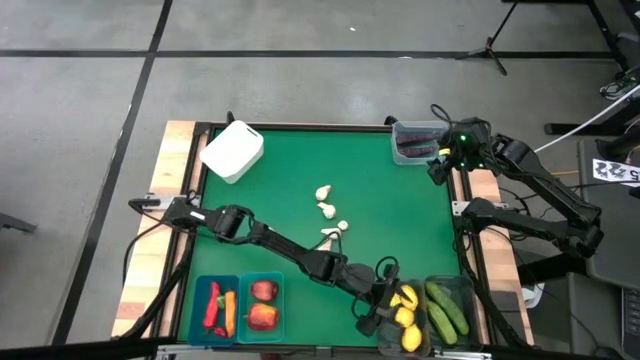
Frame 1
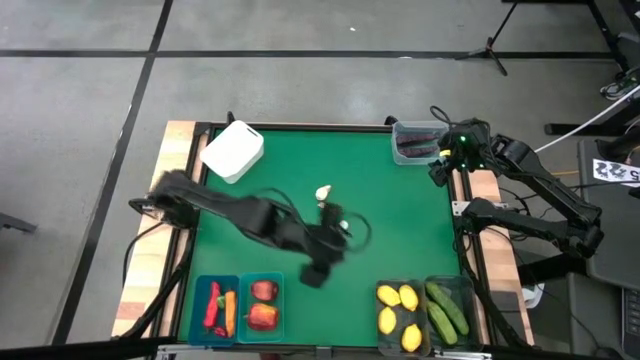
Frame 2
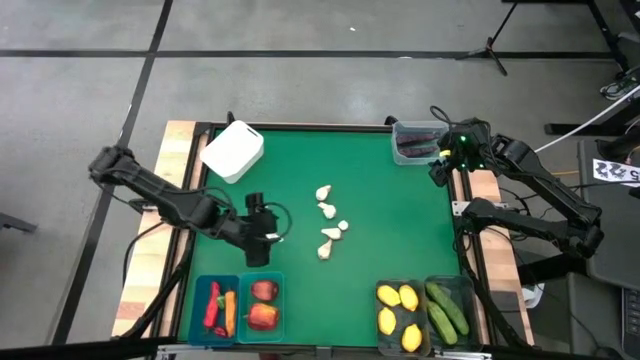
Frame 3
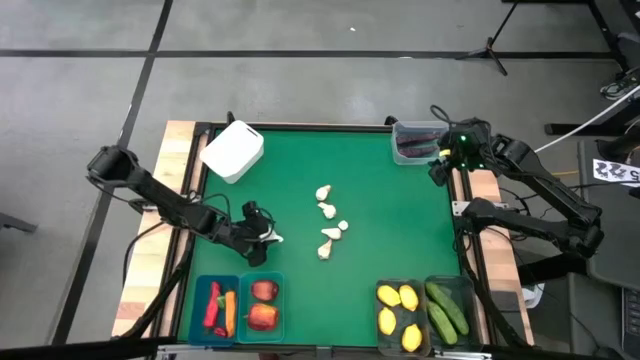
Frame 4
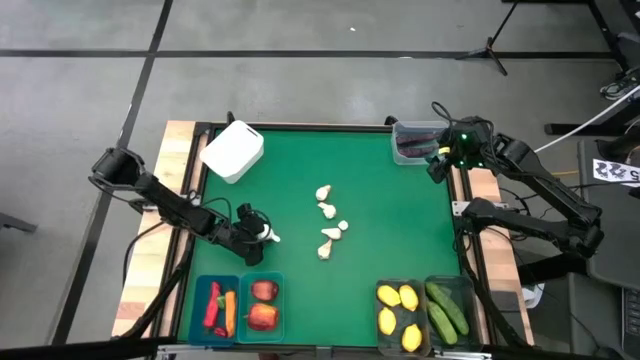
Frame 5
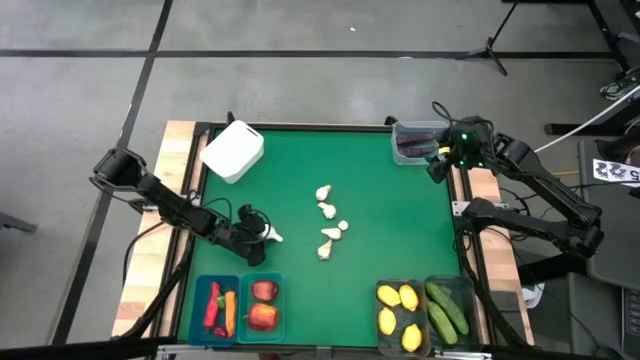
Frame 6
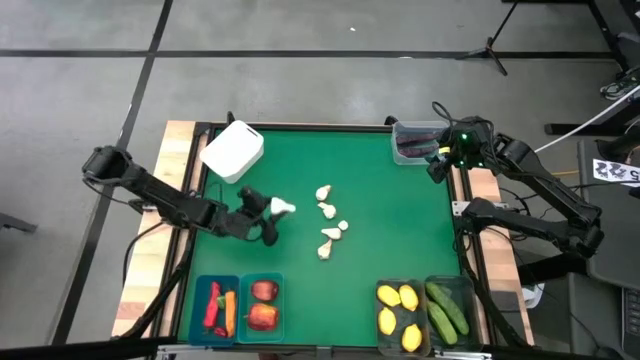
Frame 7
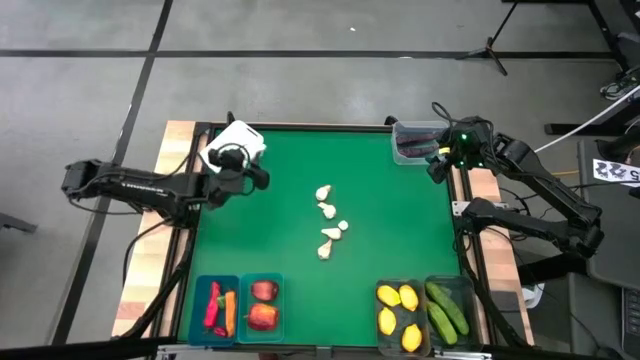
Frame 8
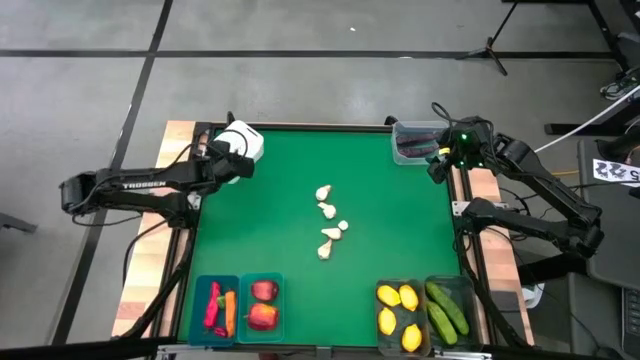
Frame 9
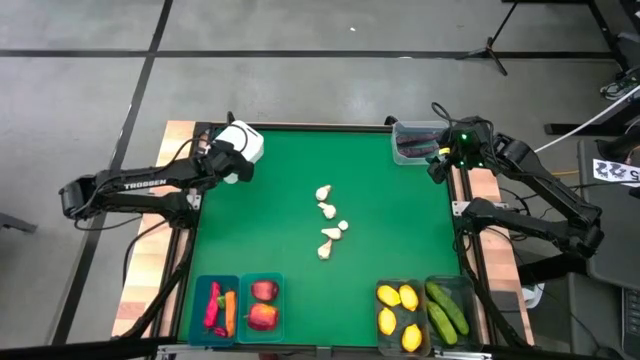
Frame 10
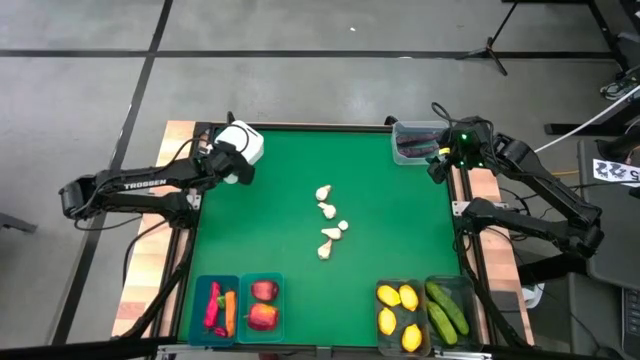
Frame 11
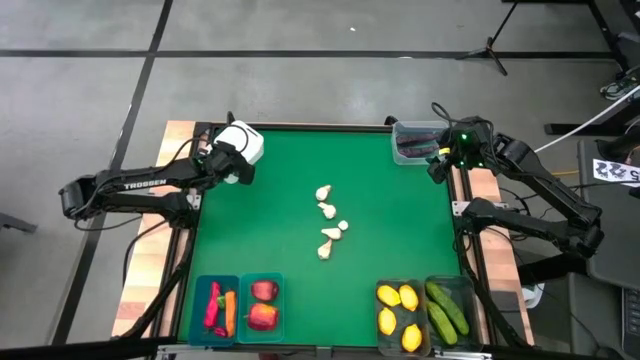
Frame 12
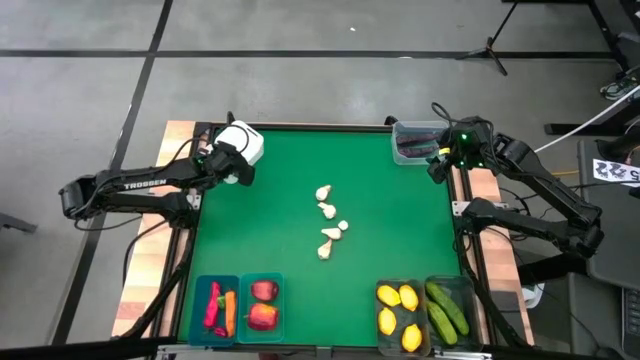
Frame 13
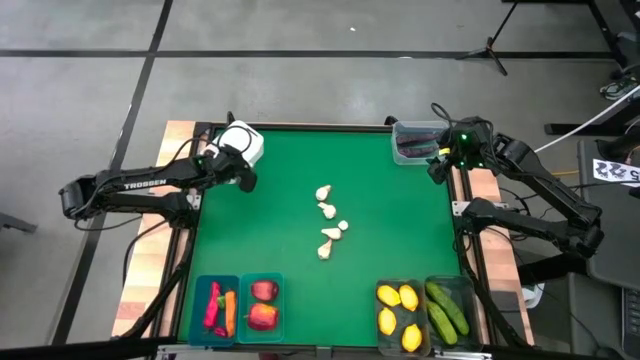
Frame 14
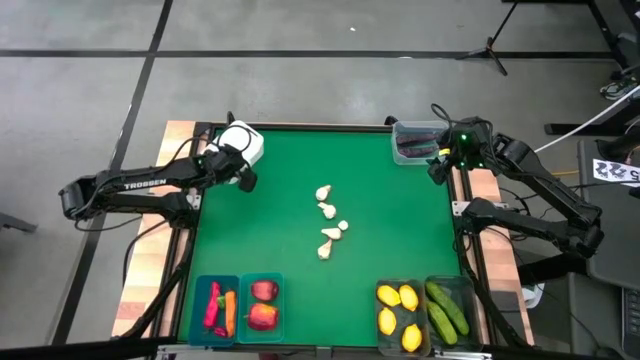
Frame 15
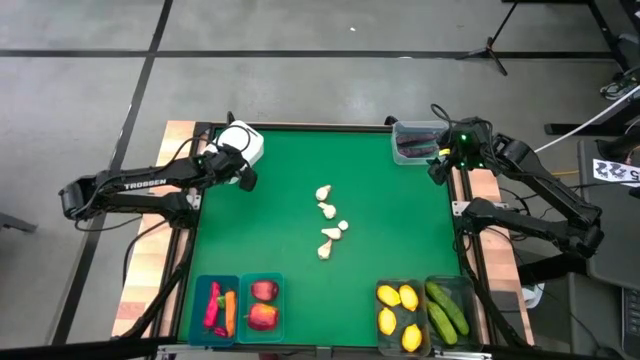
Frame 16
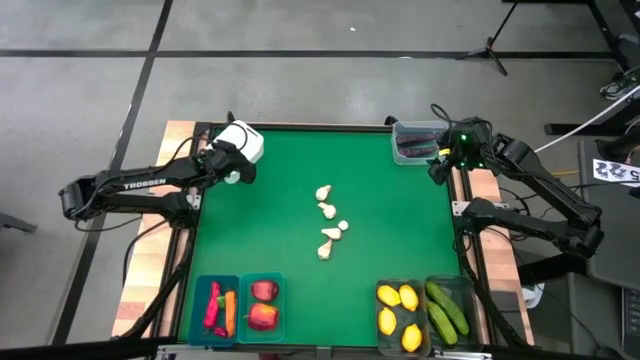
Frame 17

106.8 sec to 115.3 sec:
Task: Sort produce into baskets
Put the garlic into the white bin

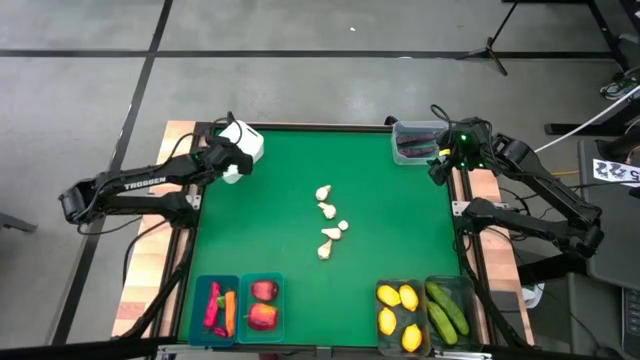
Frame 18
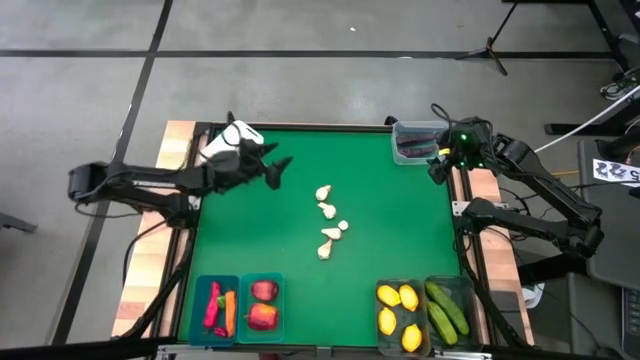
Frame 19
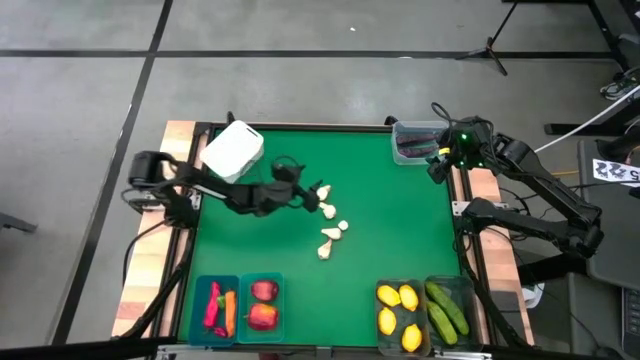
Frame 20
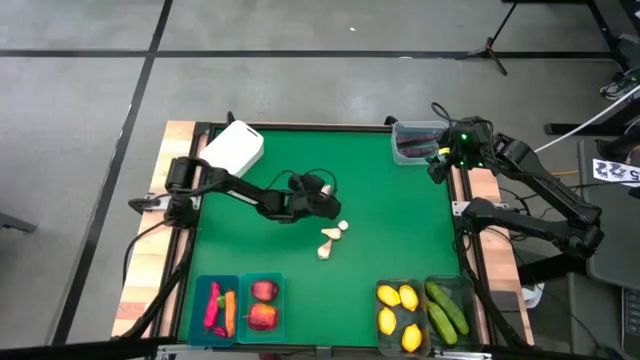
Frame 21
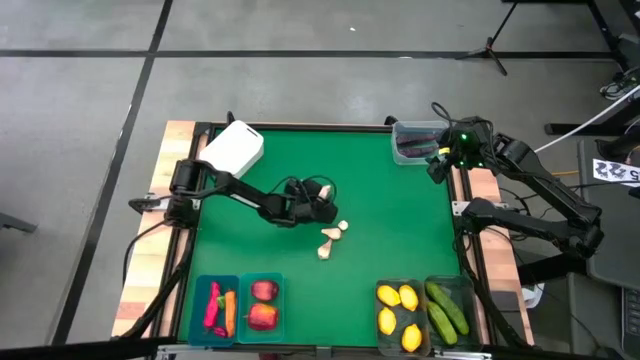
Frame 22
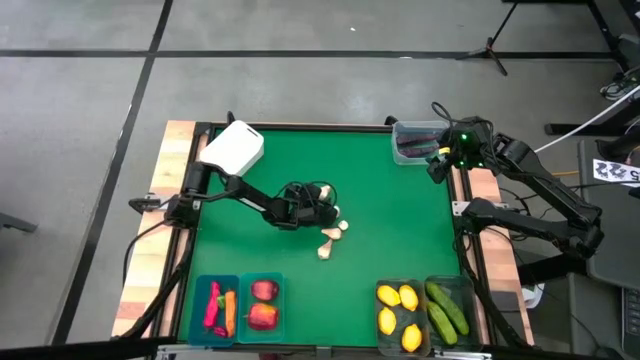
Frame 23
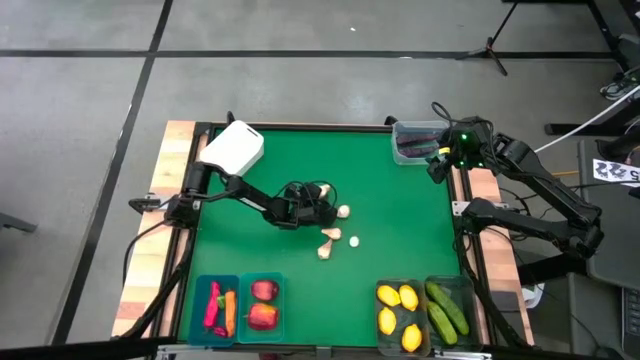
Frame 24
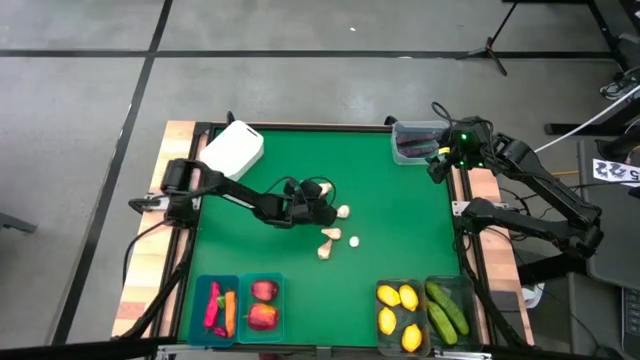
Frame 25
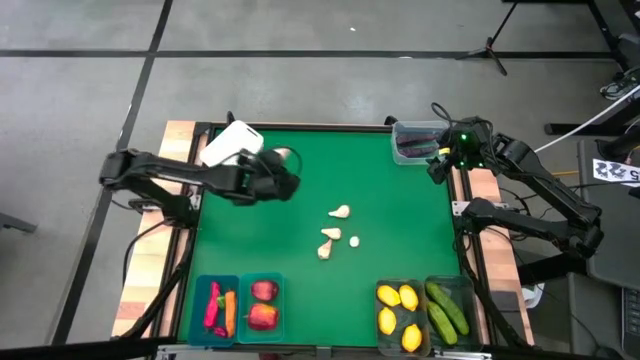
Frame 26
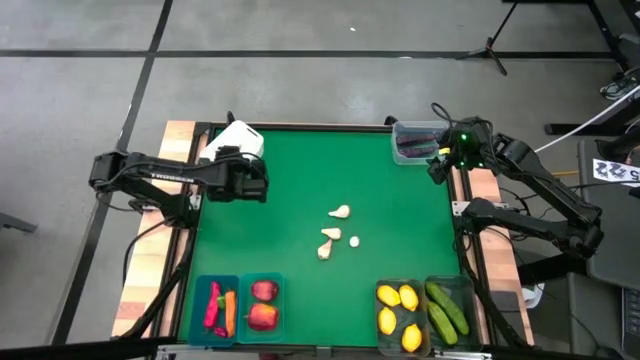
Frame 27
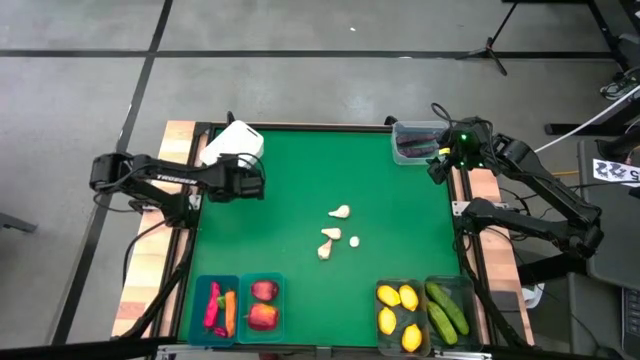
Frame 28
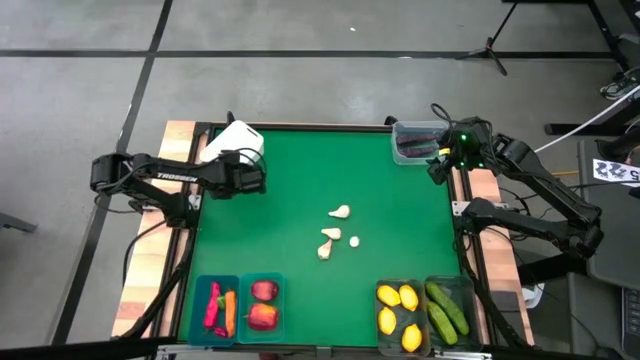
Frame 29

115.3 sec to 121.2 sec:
Put the garlic into the white bin

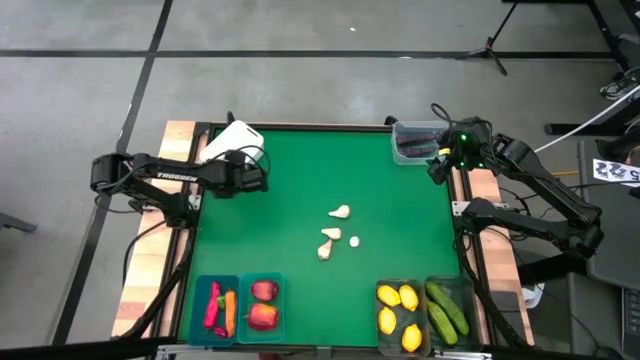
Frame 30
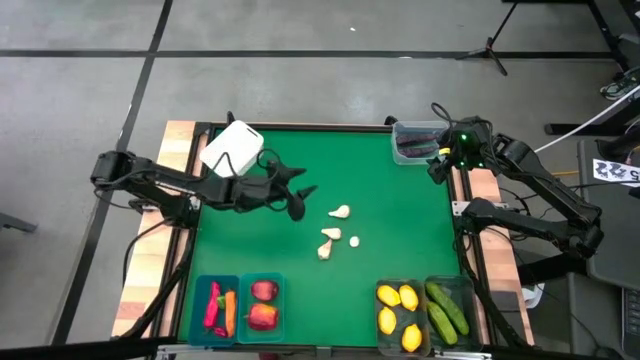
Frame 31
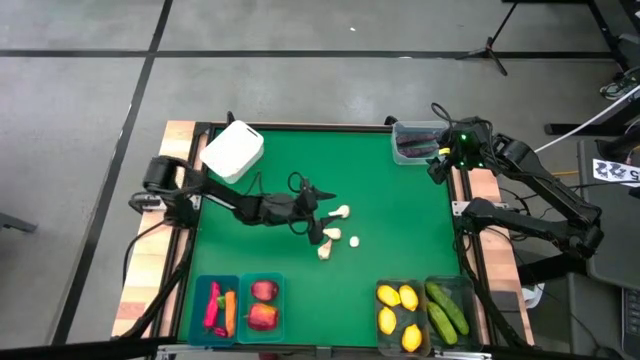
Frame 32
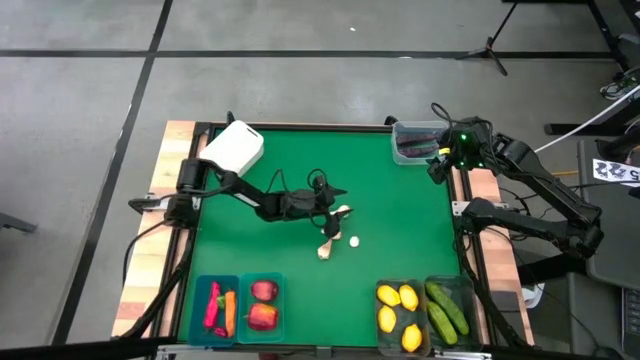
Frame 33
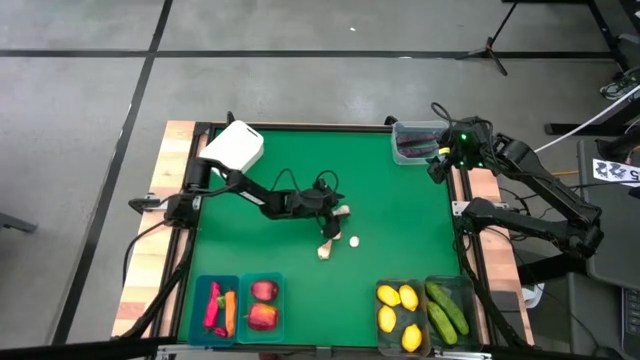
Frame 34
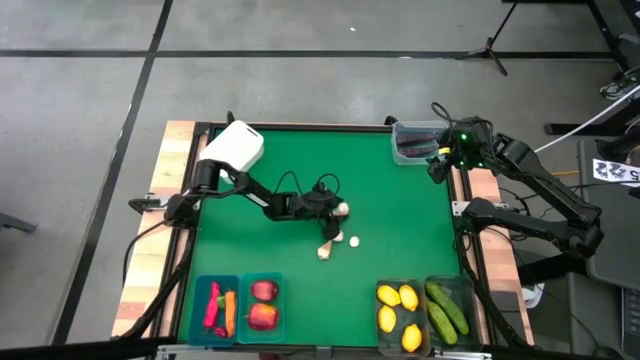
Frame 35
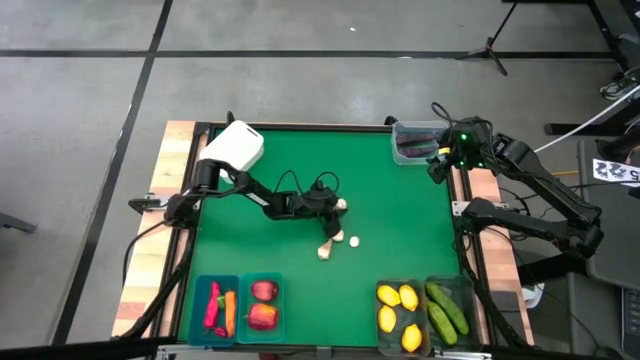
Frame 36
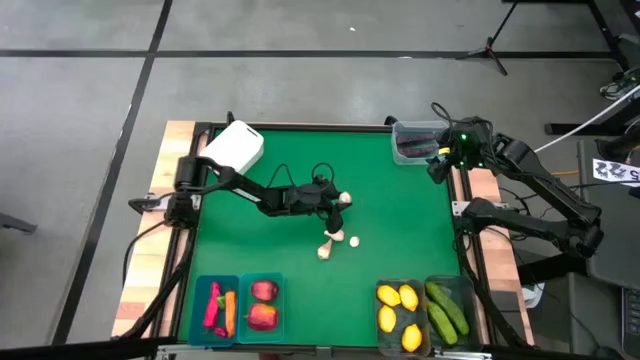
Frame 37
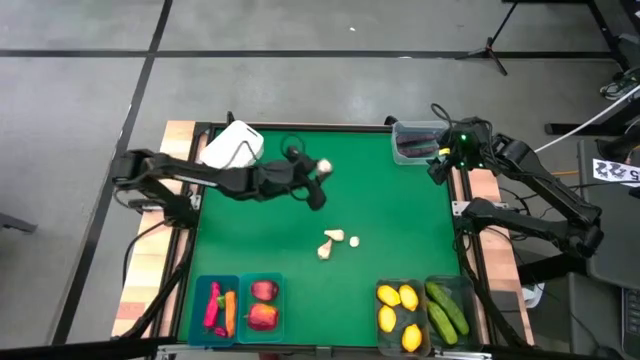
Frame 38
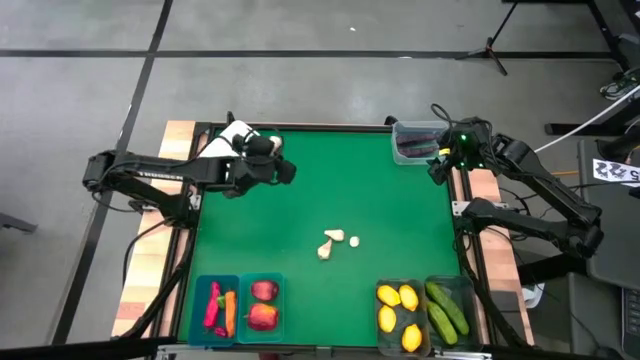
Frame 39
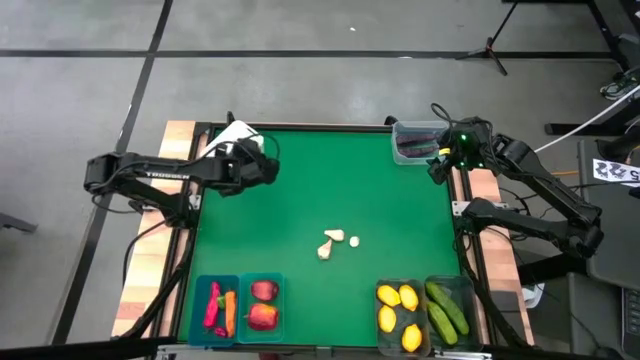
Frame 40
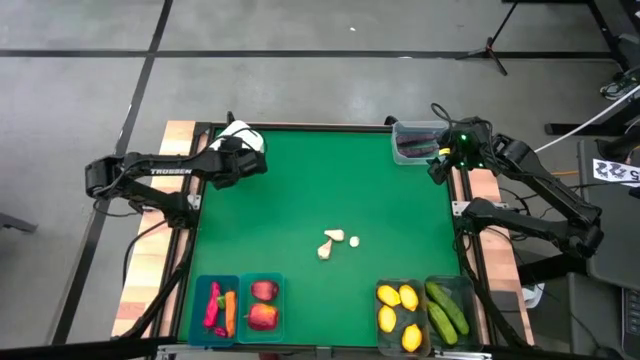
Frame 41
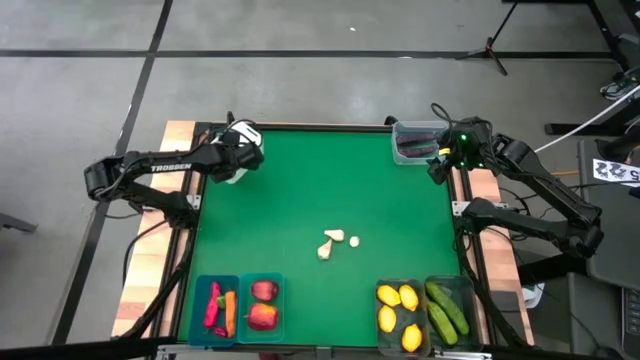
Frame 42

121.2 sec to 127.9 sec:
Put the garlic into the white bin
